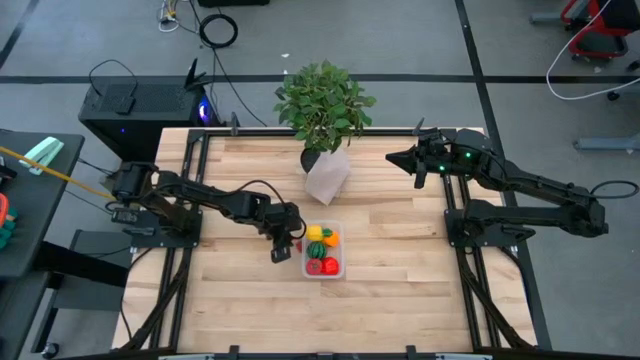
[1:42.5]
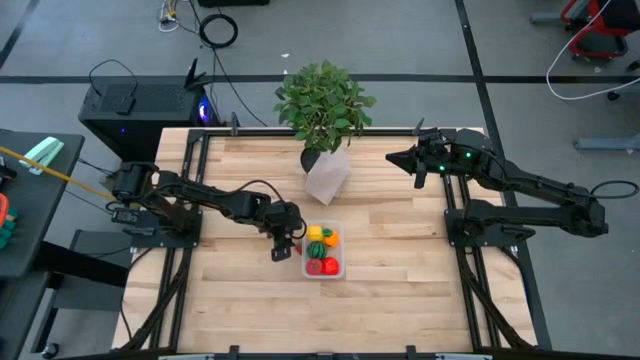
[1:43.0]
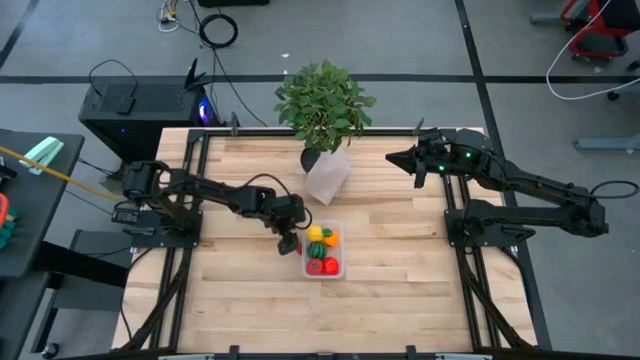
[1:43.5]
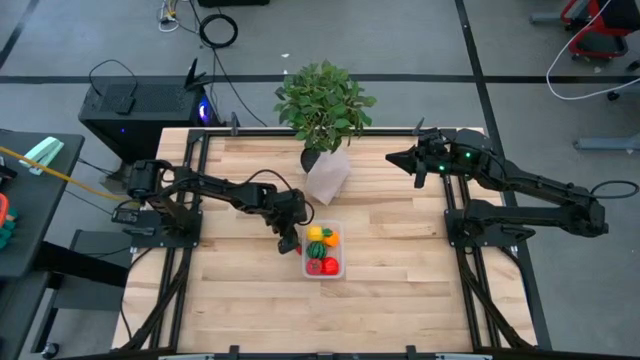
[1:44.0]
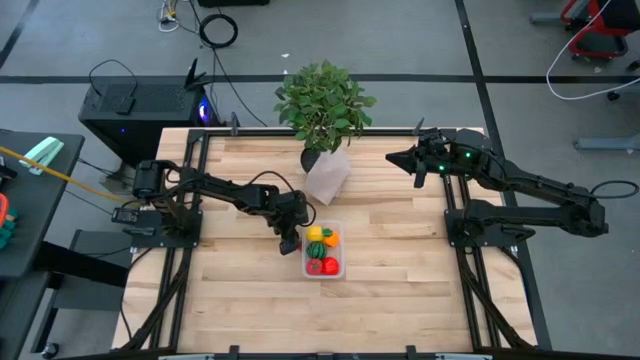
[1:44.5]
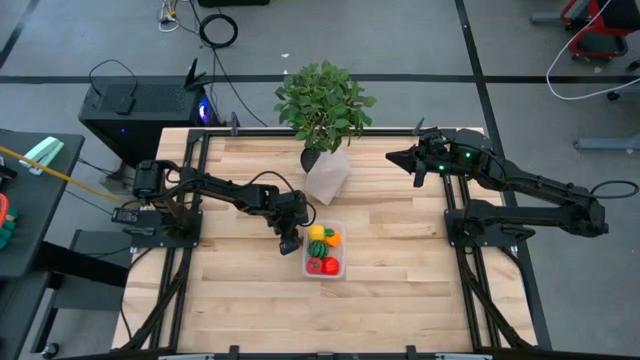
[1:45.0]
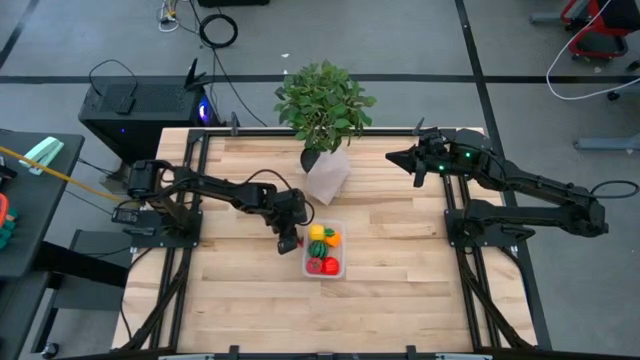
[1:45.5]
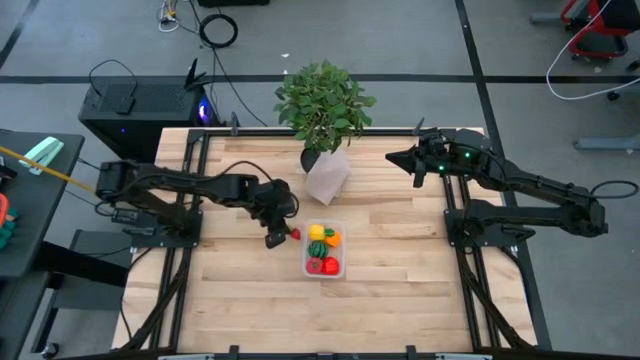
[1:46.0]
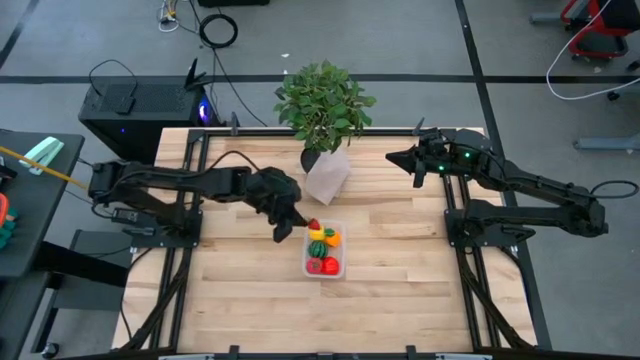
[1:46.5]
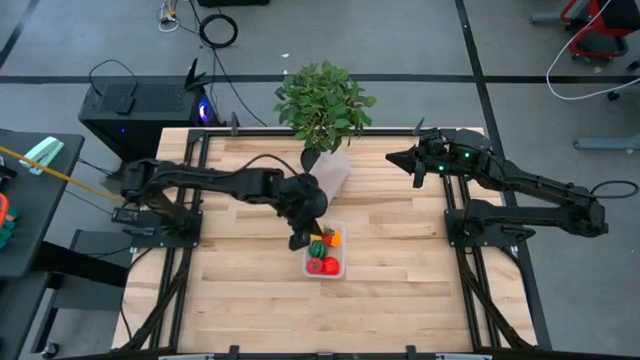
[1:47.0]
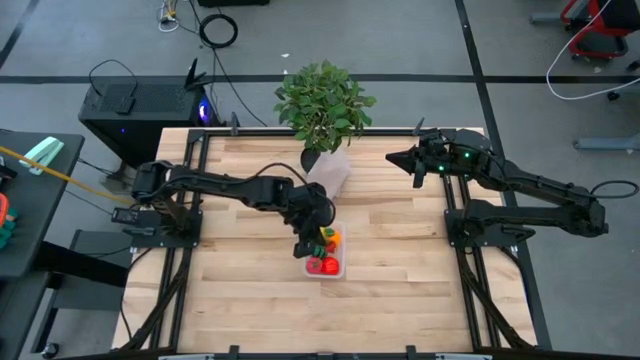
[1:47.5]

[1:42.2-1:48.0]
Task: Pick and placing Produce into tupperware
Put the red strawberry into the transparent bin

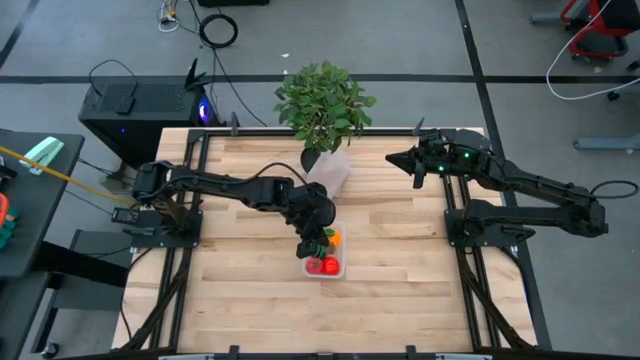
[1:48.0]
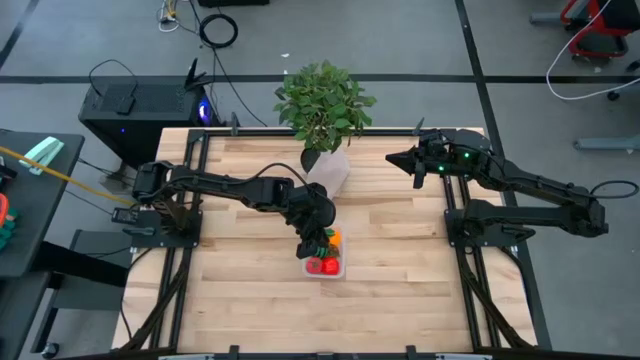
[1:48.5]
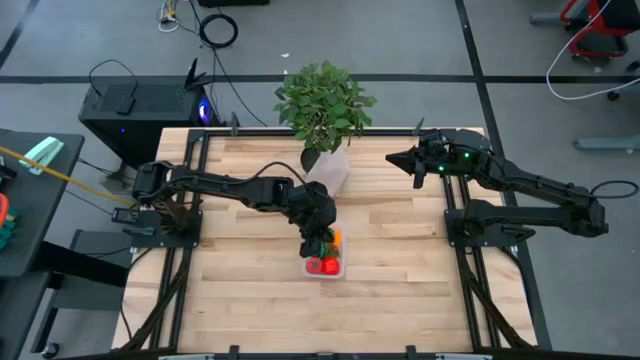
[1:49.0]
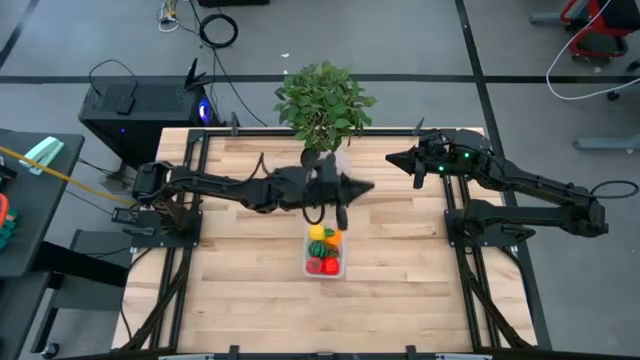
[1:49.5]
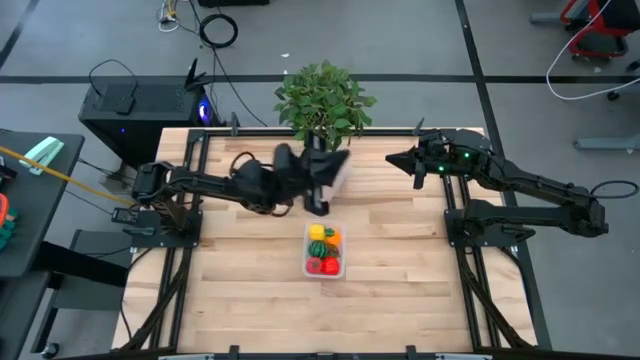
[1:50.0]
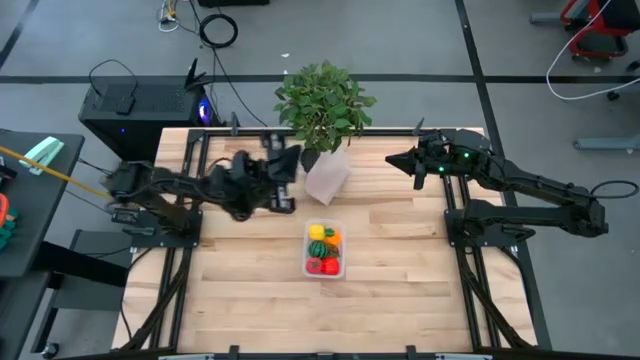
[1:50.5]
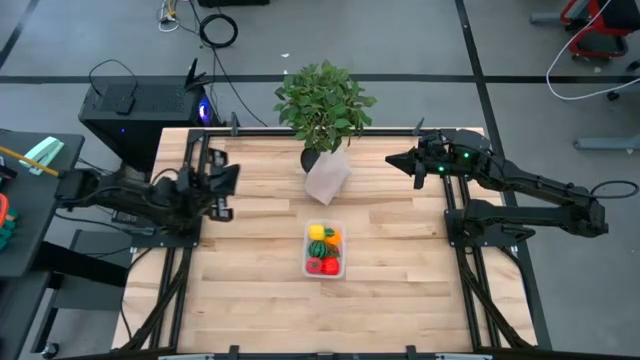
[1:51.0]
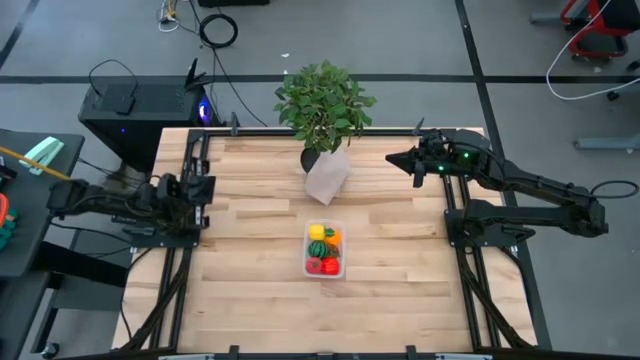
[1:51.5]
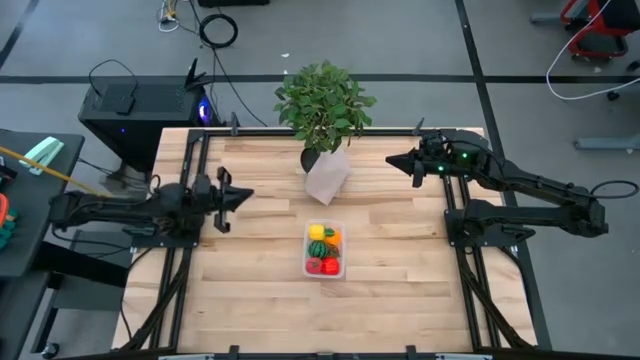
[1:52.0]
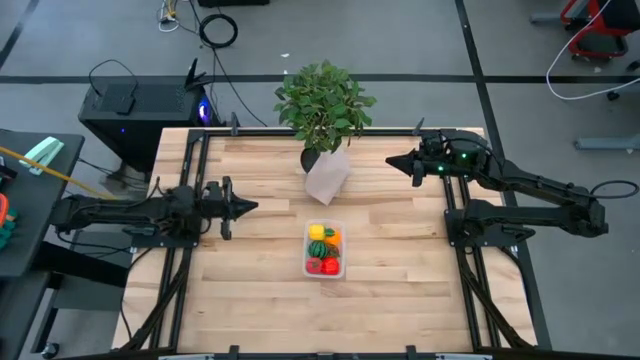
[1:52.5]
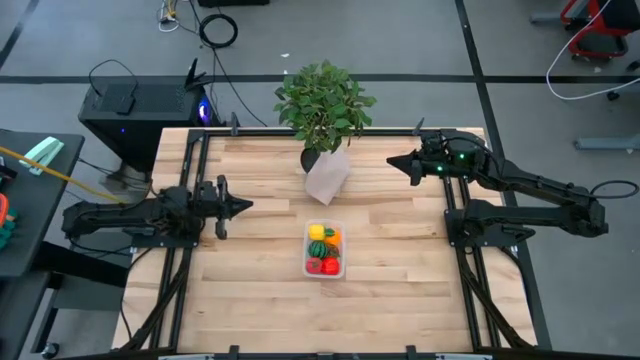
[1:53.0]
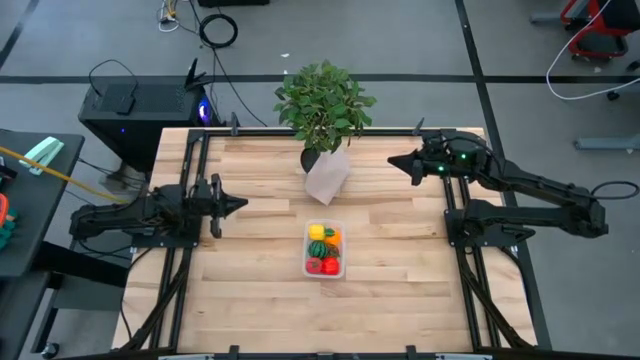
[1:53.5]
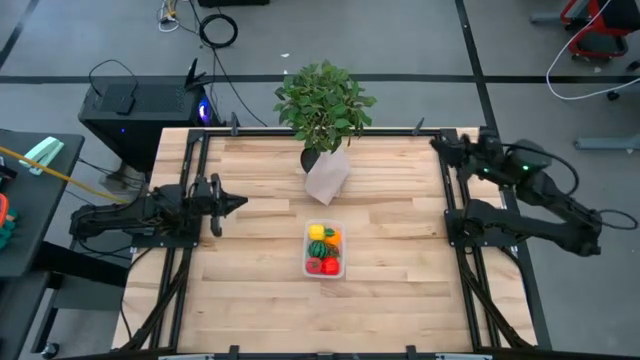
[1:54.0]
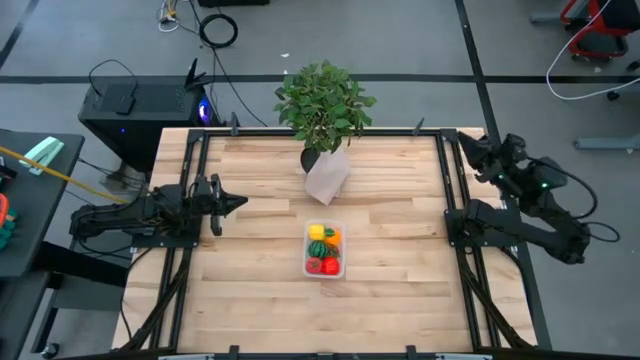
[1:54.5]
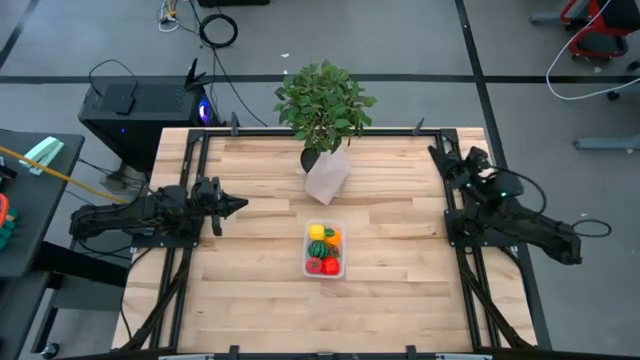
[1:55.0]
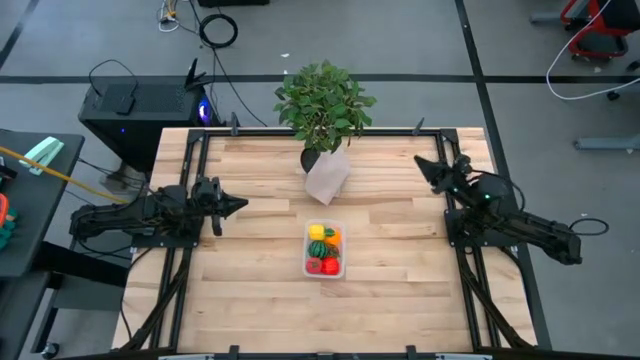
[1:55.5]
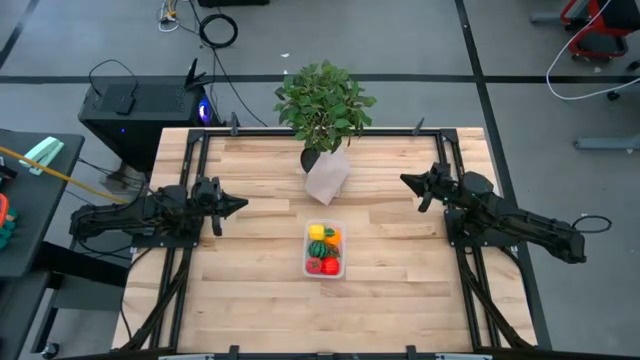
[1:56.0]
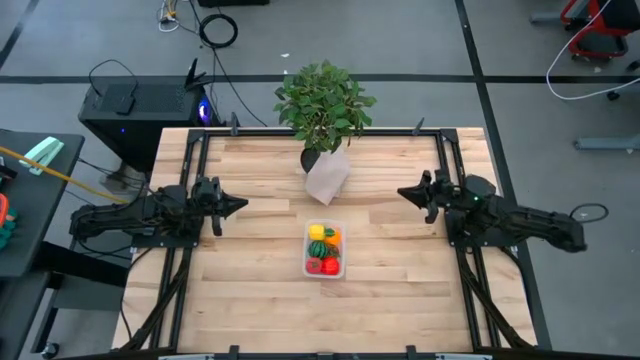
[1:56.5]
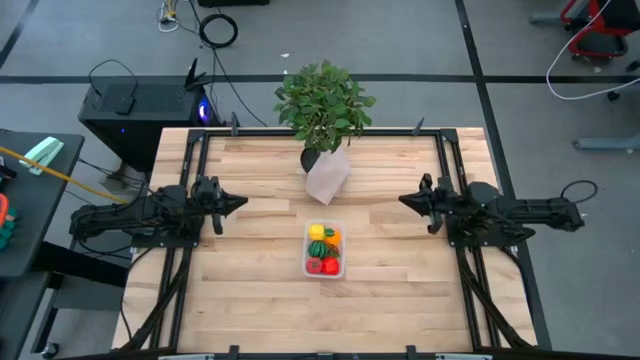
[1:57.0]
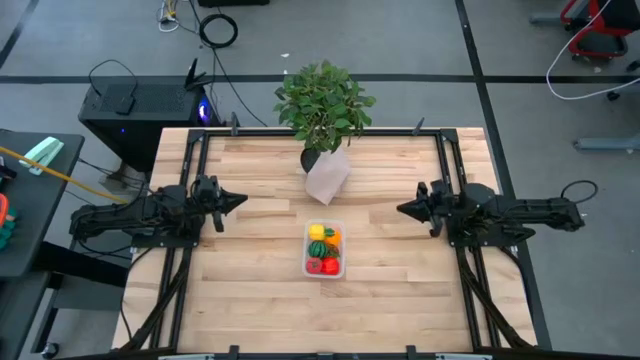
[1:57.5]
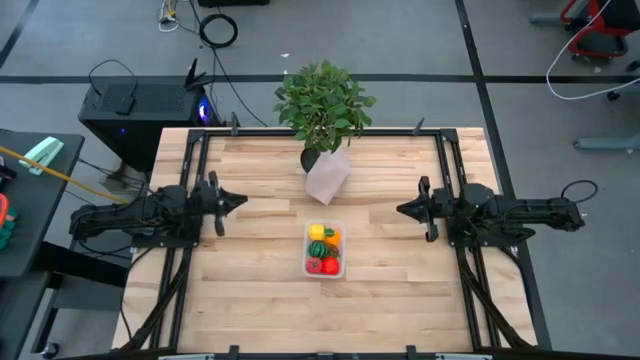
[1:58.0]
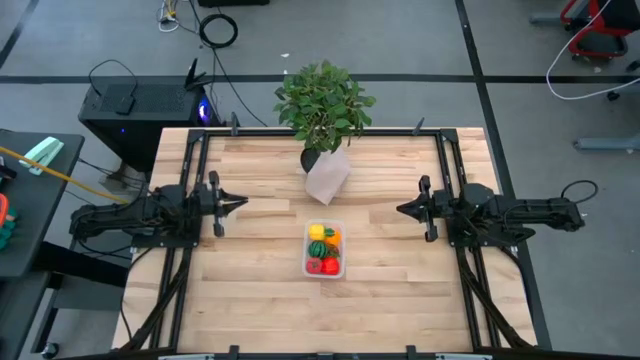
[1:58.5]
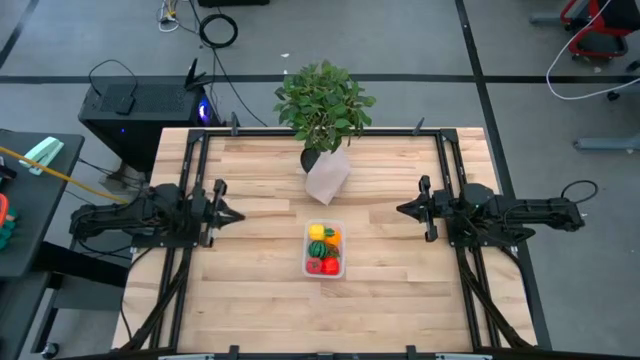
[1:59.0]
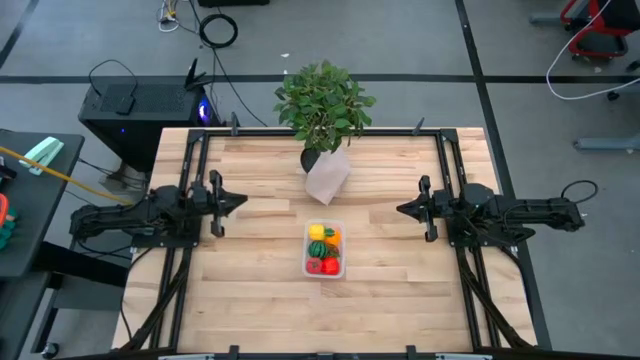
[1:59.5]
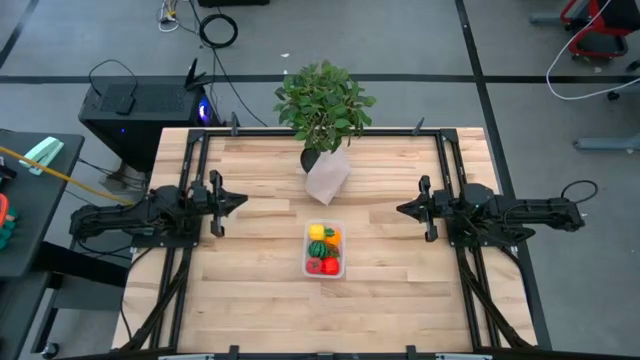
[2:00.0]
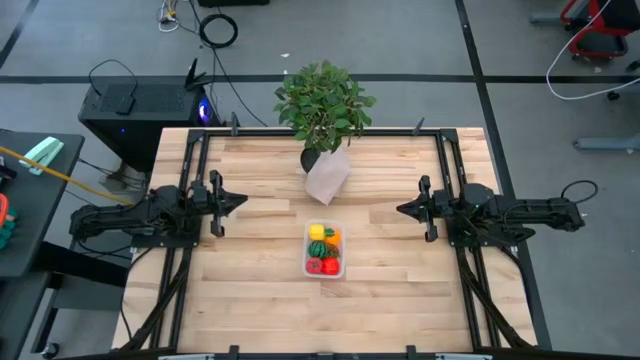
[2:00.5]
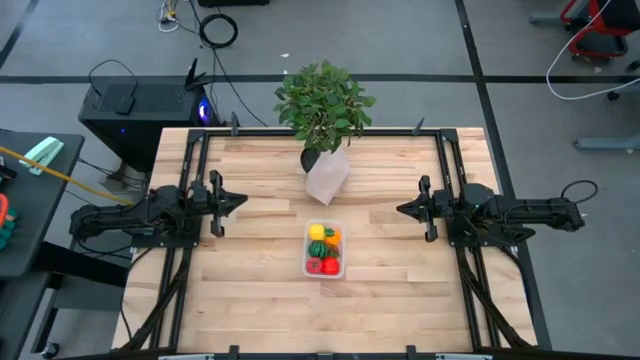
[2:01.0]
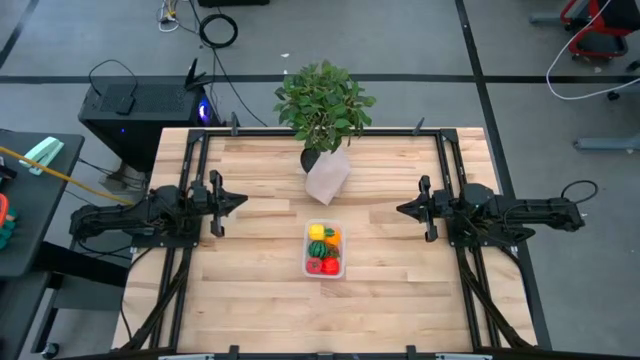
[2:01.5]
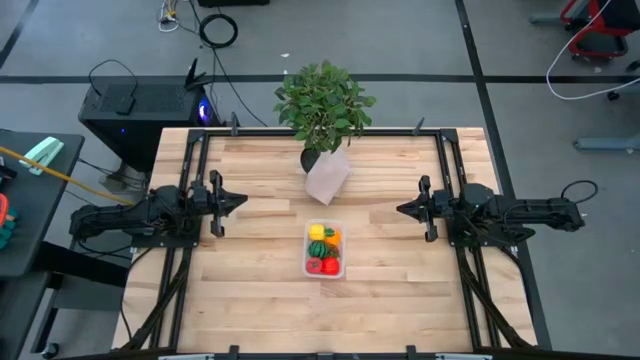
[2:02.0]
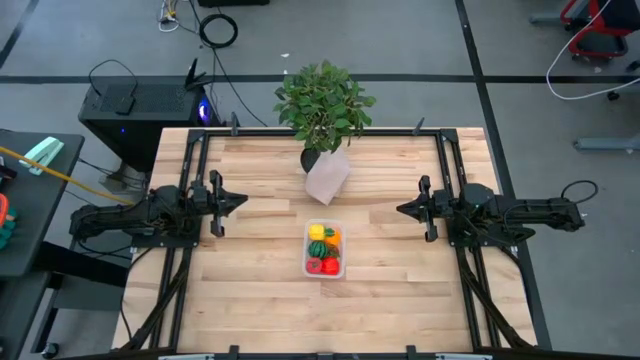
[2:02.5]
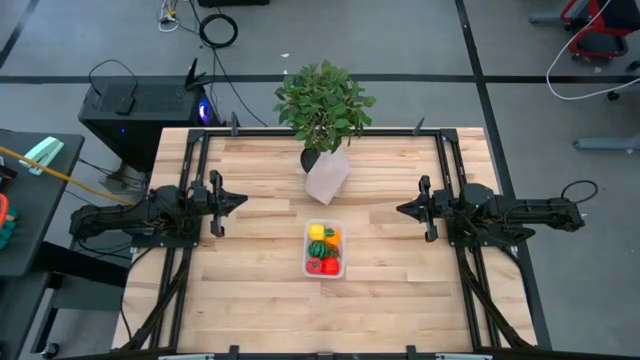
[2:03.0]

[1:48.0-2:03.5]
Return to Home Position
